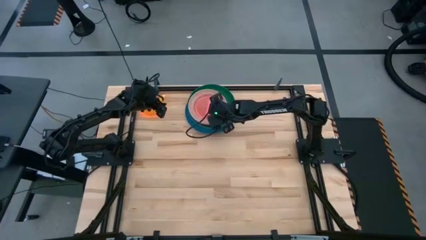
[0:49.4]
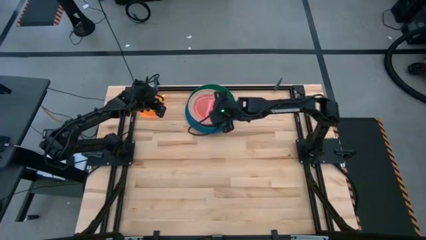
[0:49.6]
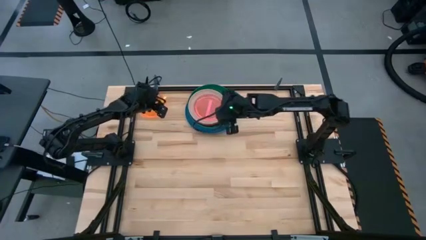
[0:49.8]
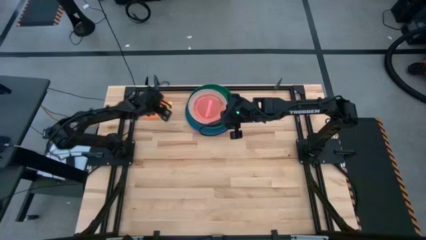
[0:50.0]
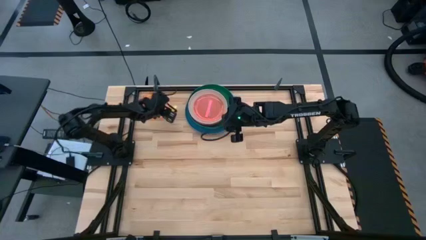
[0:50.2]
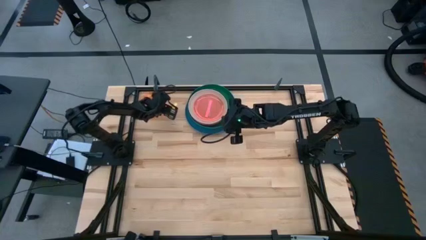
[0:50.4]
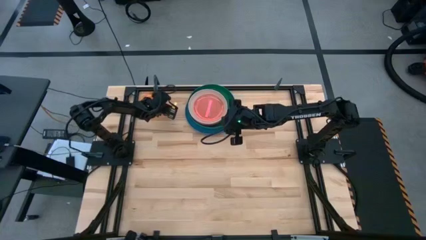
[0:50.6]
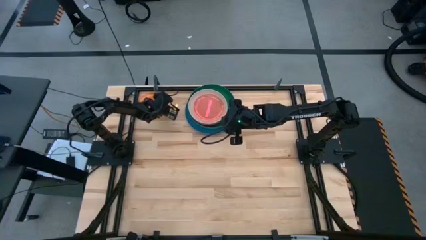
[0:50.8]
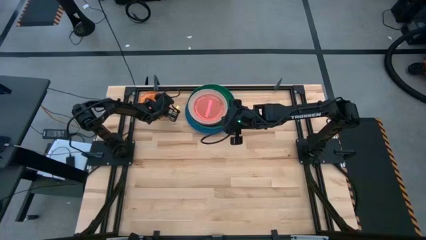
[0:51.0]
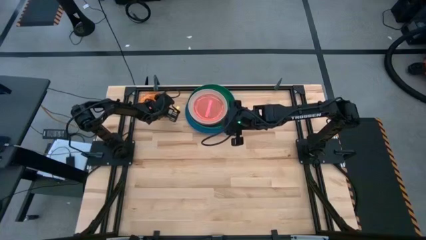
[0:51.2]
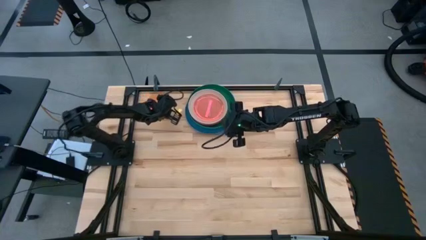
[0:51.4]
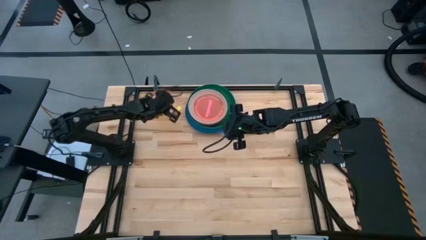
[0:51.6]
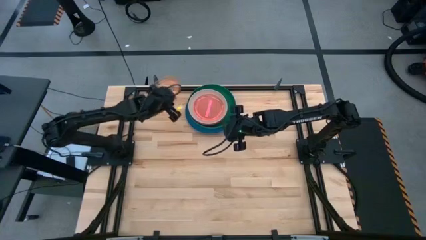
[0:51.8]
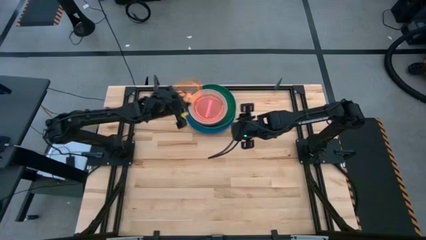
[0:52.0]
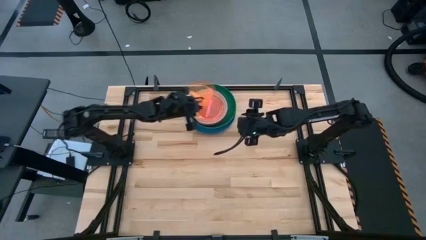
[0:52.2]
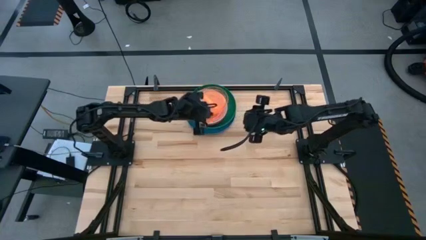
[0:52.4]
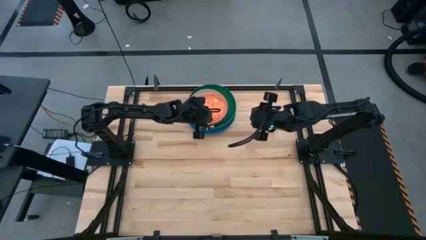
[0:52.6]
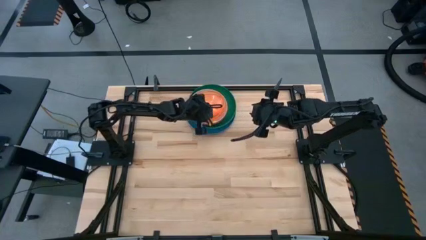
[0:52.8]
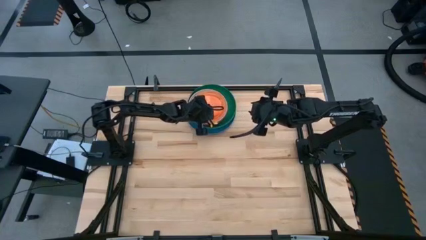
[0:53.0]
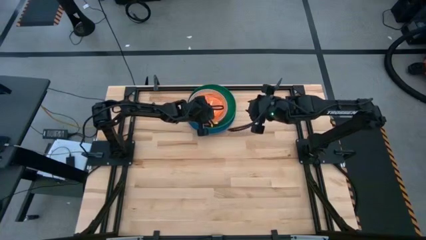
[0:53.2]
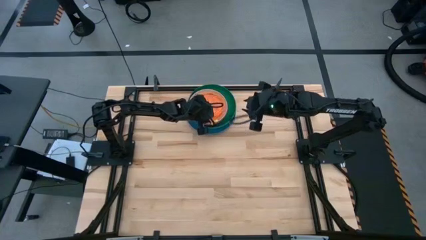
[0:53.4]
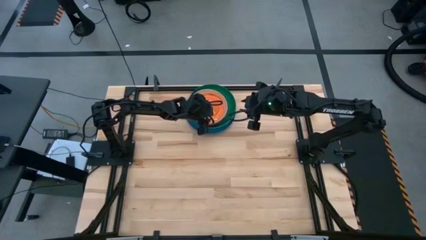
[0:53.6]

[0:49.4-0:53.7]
Task: Stack plastic plates
Stack the orange plate on top of the pink plate

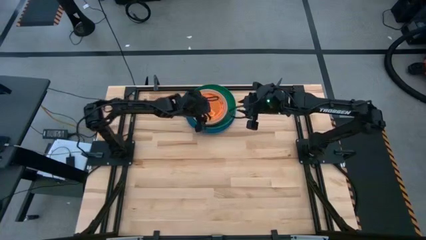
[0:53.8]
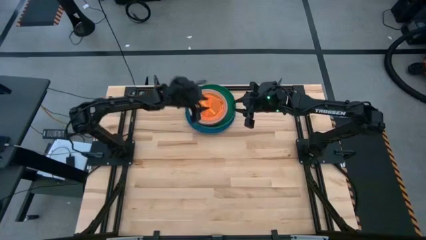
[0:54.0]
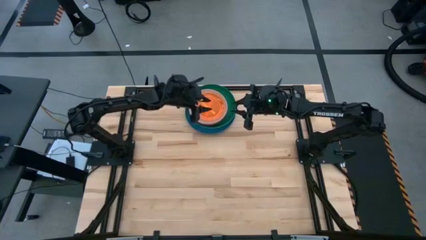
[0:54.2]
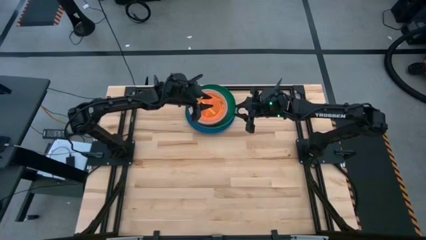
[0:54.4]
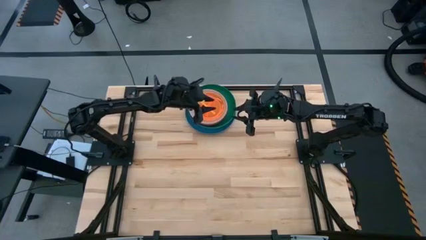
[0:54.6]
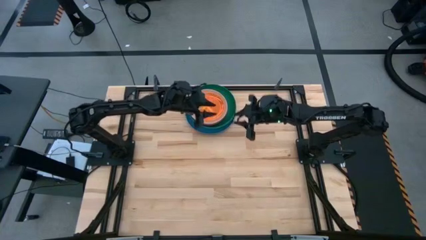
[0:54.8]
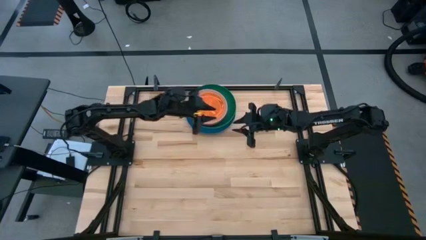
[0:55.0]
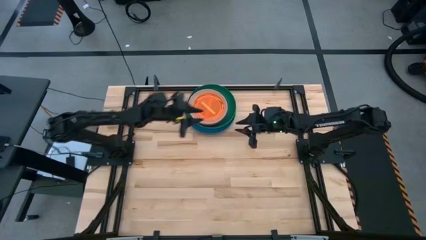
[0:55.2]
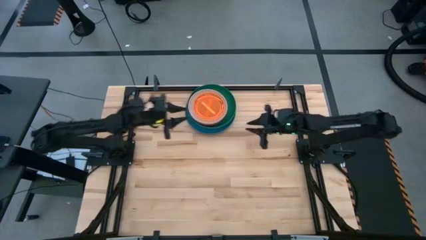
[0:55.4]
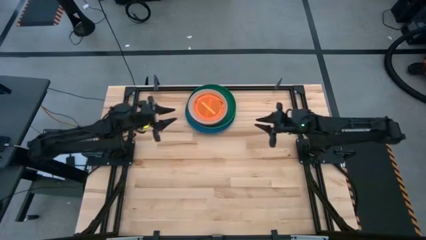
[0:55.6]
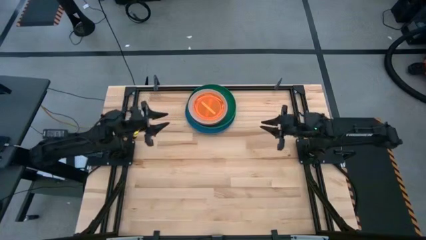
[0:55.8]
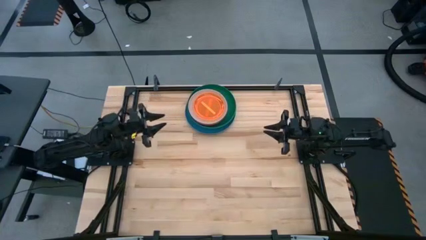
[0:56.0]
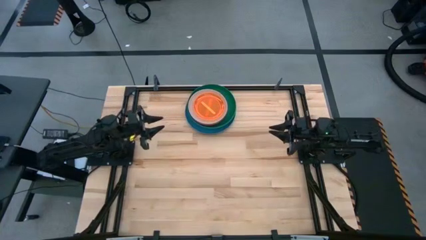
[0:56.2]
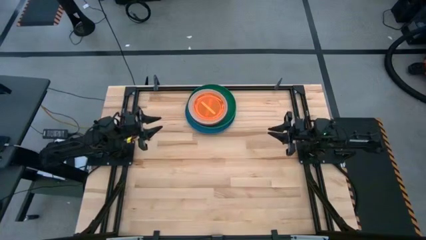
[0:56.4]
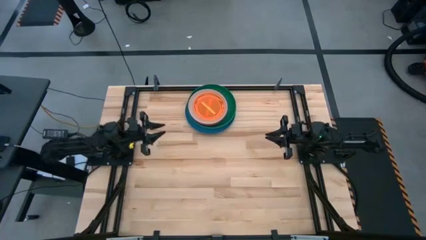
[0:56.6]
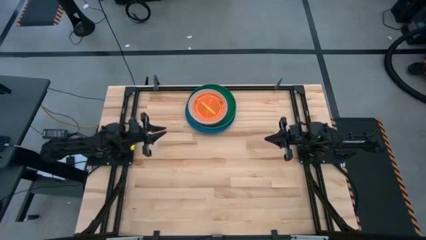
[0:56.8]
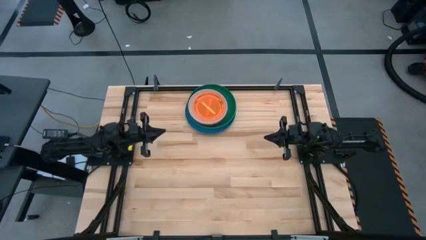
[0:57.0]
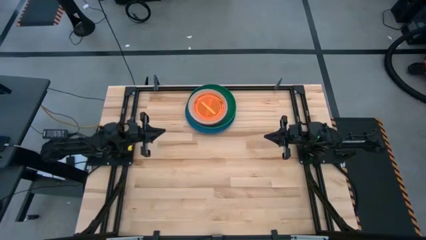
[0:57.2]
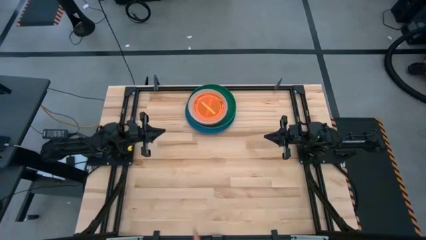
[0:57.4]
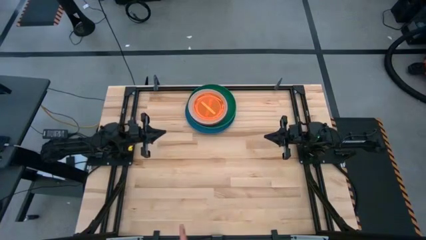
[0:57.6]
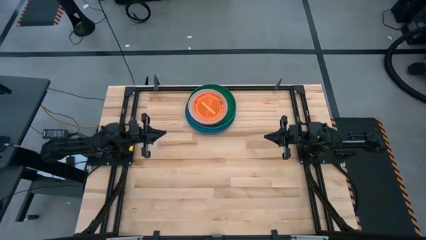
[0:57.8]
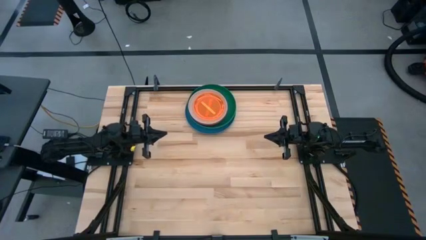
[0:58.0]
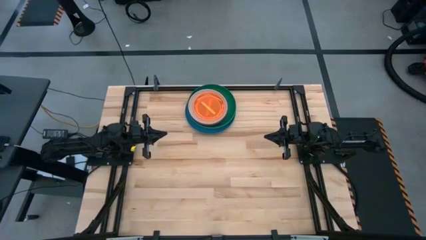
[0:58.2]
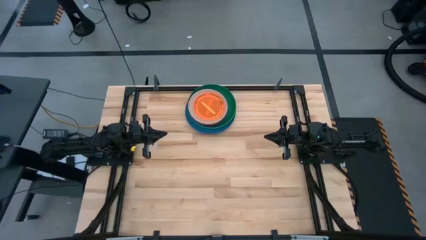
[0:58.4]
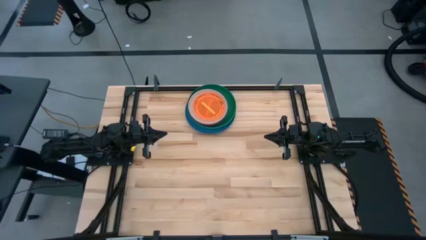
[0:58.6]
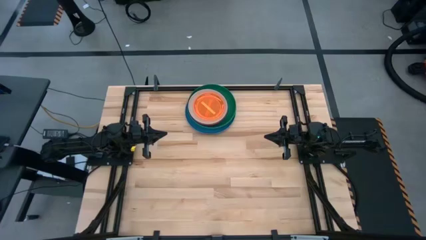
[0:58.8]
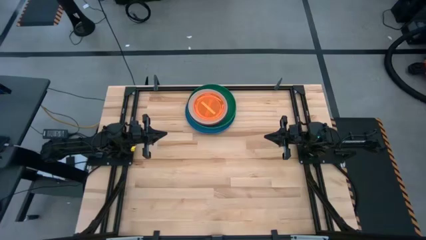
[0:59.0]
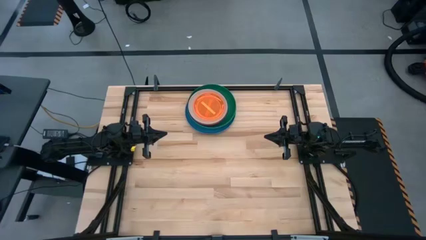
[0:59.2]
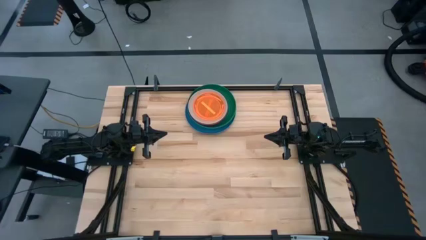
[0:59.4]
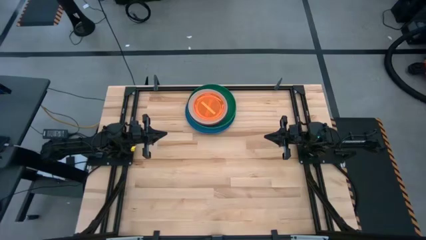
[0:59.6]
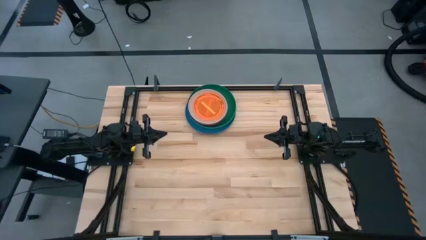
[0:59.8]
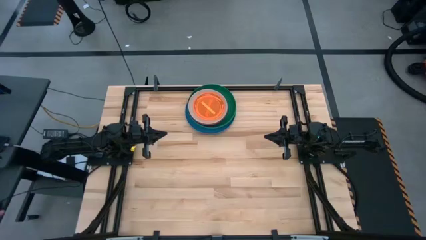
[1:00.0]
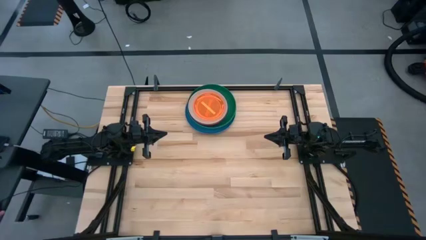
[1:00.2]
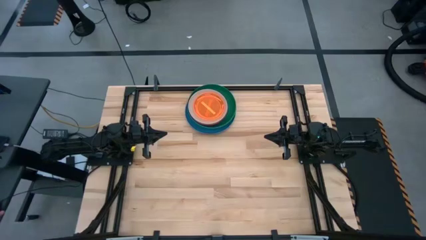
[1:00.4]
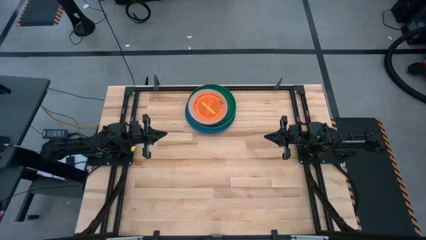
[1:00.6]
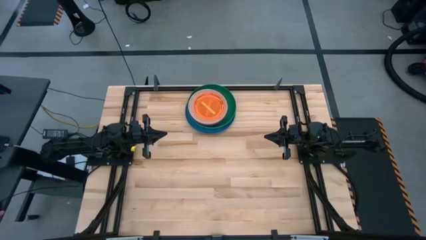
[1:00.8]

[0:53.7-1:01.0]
Return to Home Position

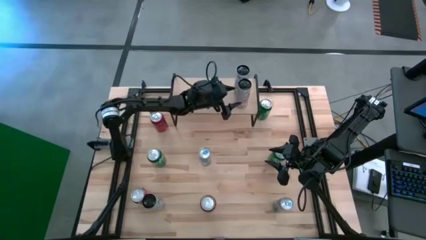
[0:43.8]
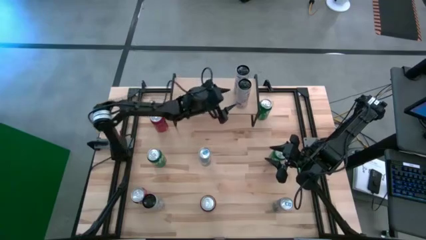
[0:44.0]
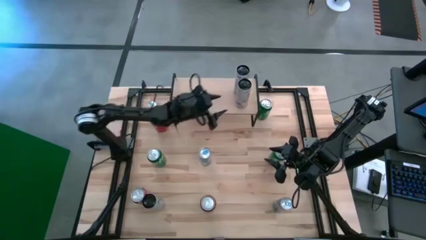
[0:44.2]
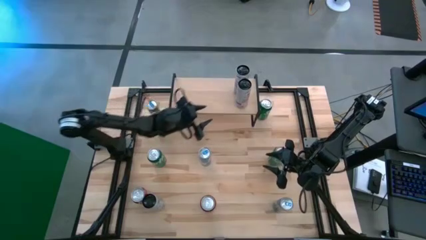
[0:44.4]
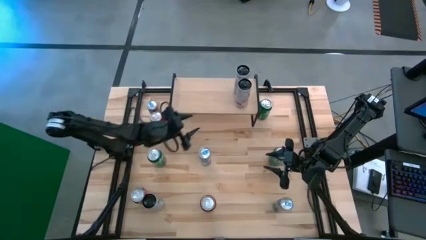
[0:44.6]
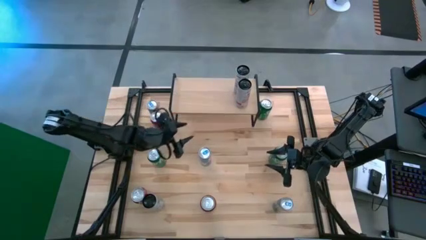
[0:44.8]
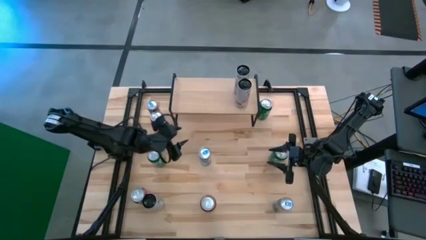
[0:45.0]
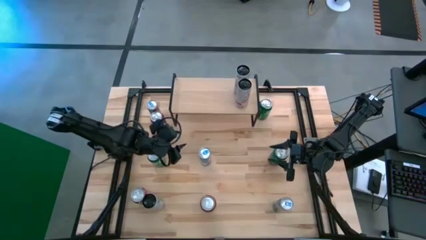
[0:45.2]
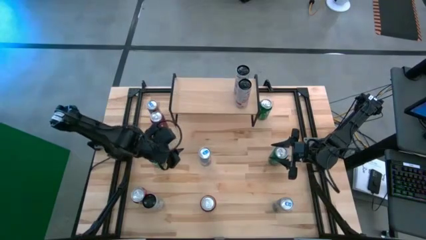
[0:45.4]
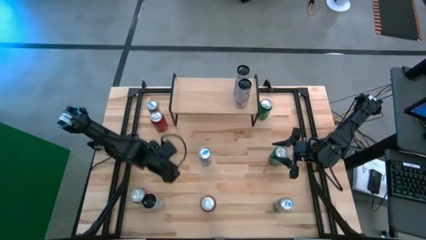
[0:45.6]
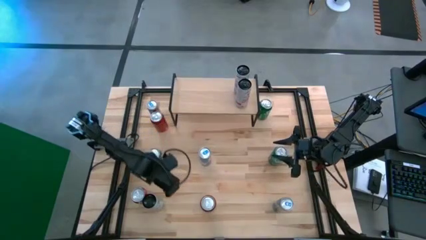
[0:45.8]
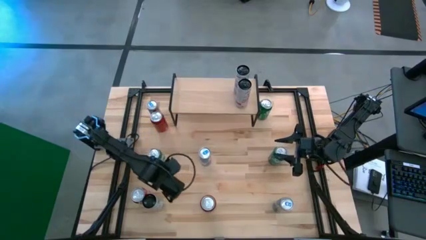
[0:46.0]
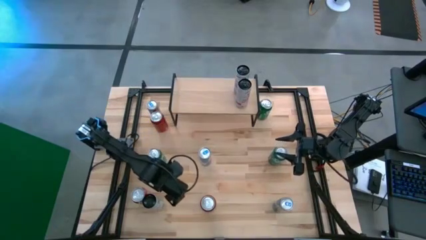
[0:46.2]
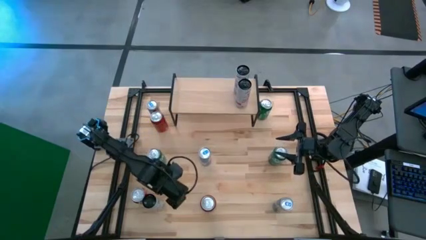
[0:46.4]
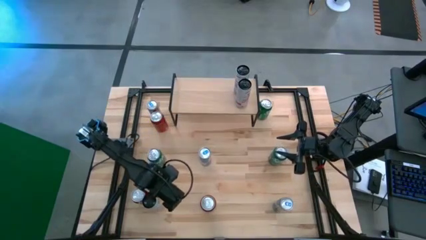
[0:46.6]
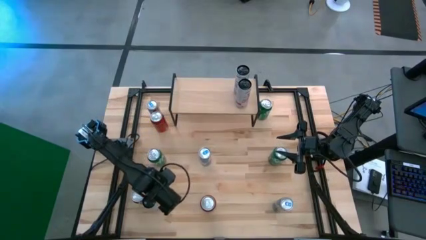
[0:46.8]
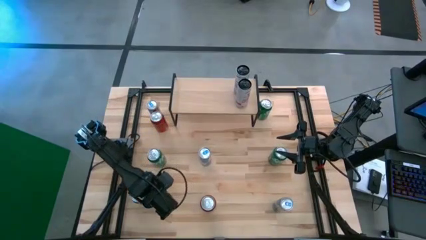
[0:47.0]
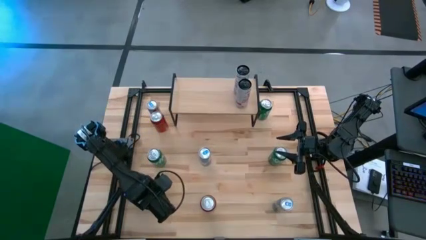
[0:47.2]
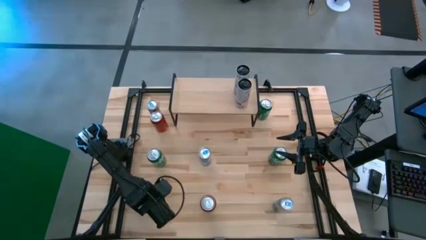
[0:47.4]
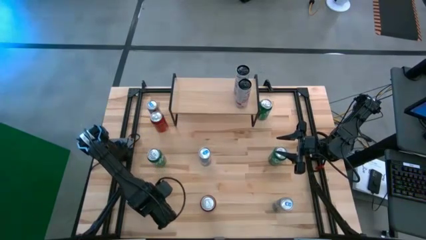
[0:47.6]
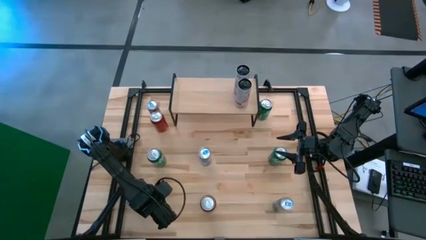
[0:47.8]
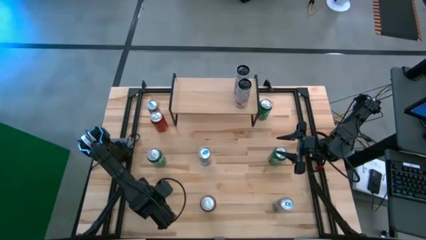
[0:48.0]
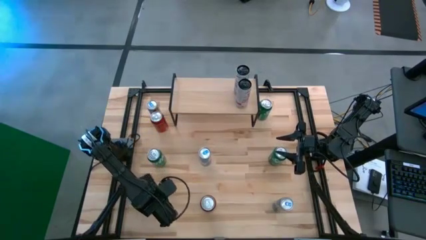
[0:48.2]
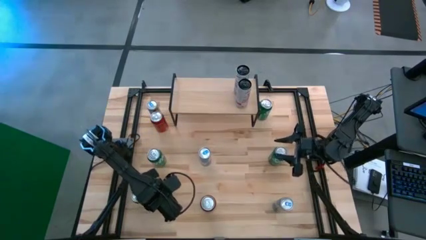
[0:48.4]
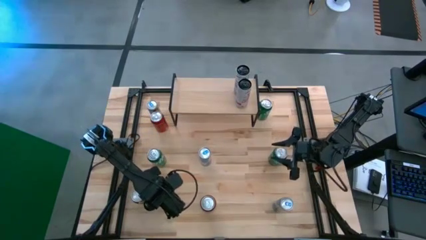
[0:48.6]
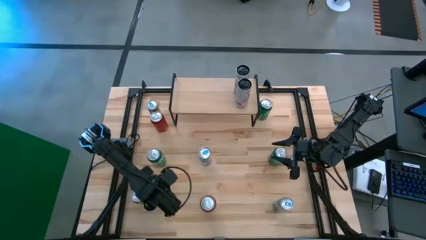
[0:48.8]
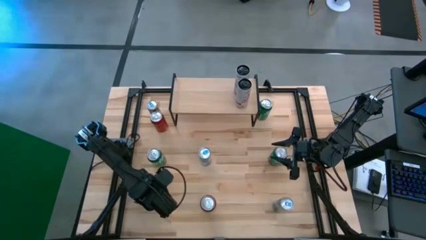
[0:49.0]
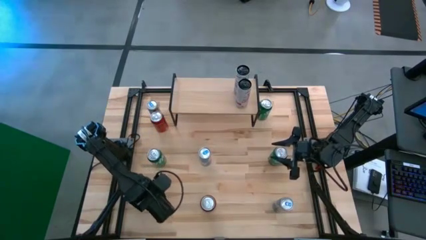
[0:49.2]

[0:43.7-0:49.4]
Task: Place canned beverage on shelf
Put the white pink soda can on the shelf aligned with the other white pink soda can
